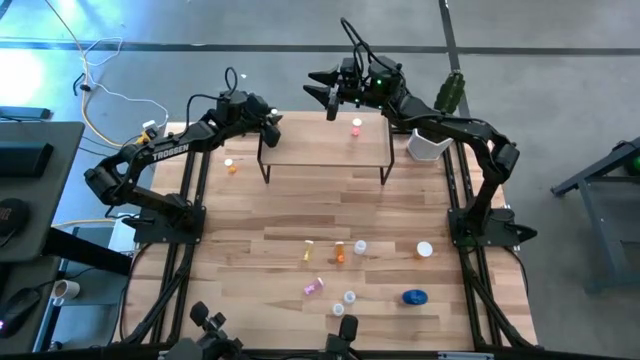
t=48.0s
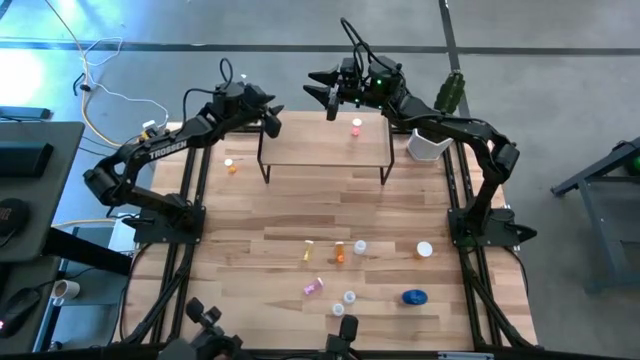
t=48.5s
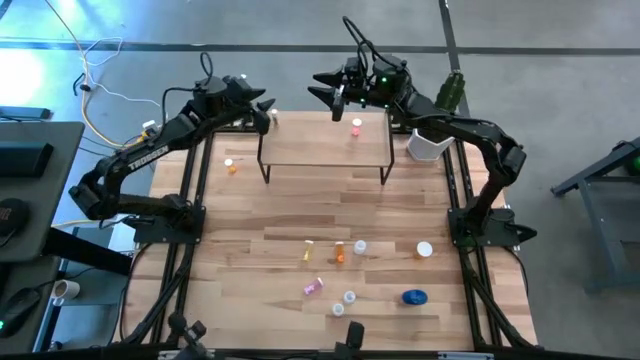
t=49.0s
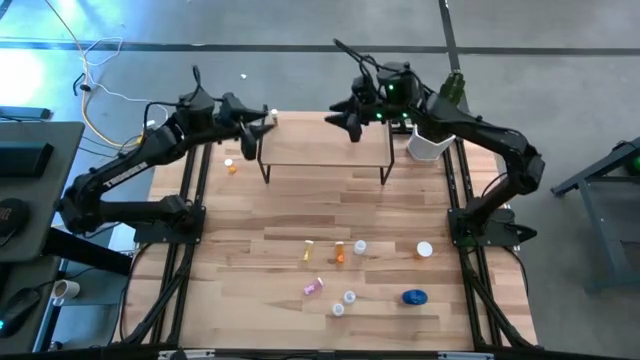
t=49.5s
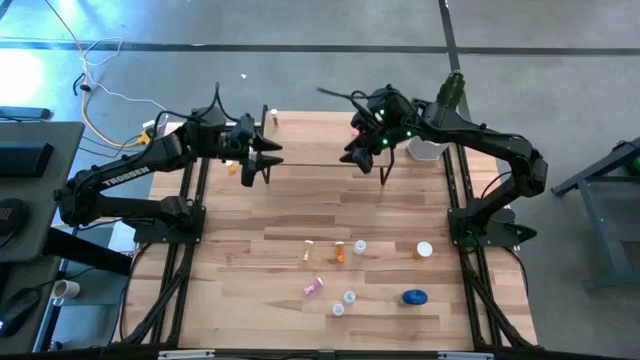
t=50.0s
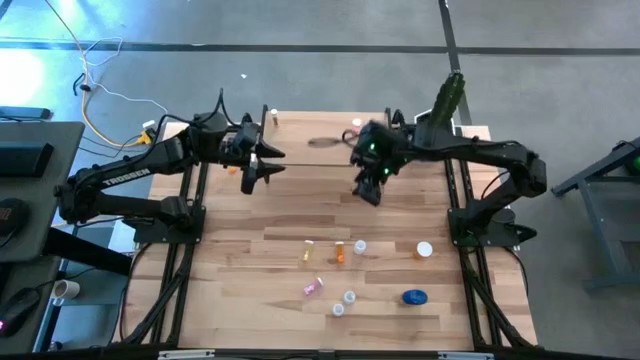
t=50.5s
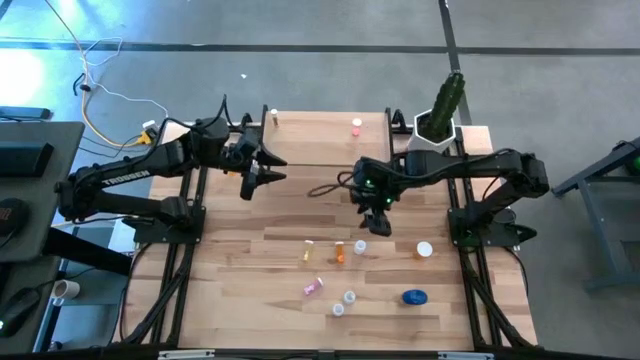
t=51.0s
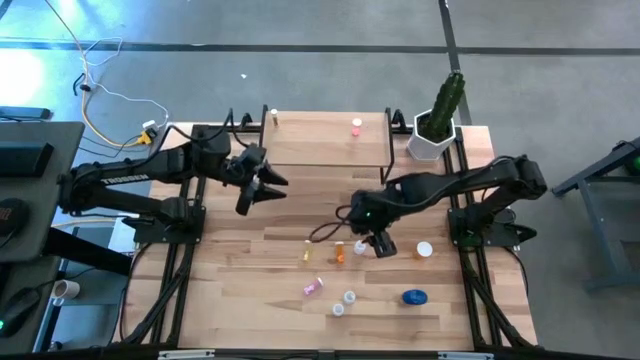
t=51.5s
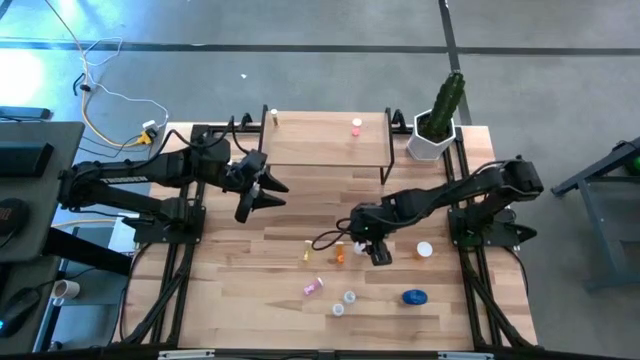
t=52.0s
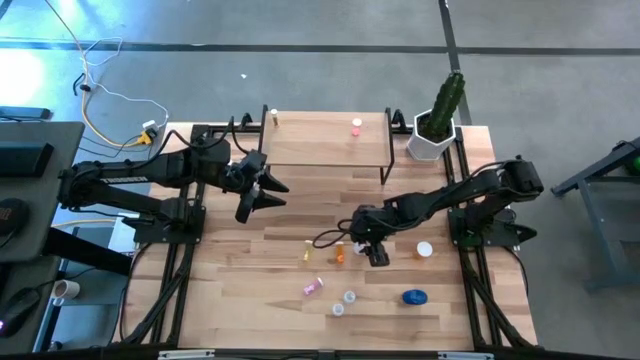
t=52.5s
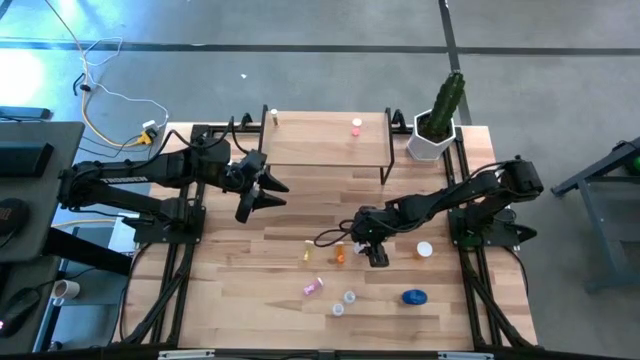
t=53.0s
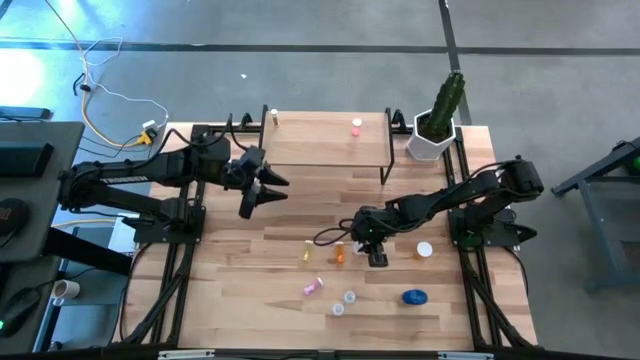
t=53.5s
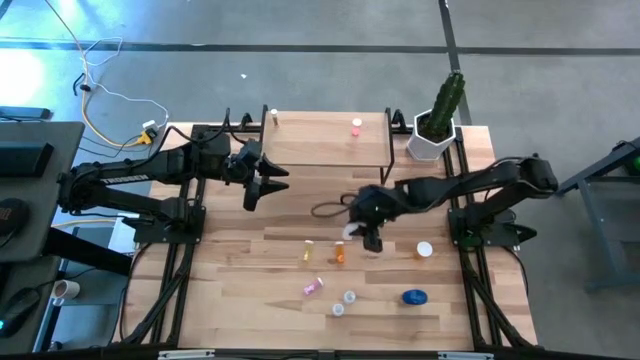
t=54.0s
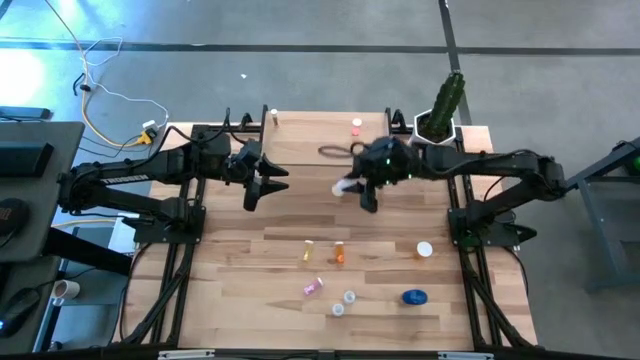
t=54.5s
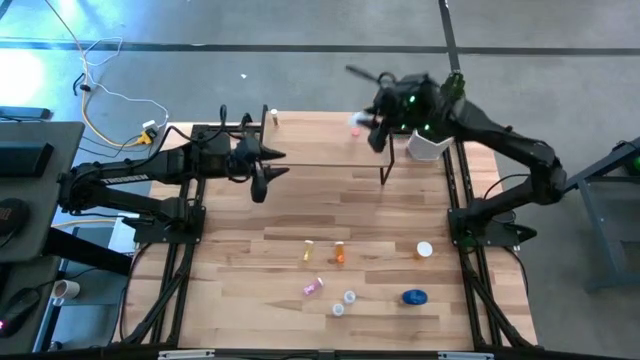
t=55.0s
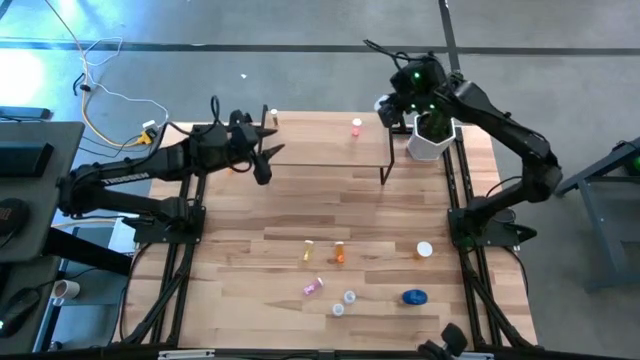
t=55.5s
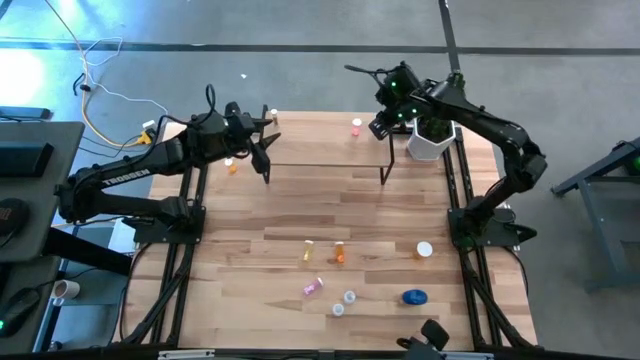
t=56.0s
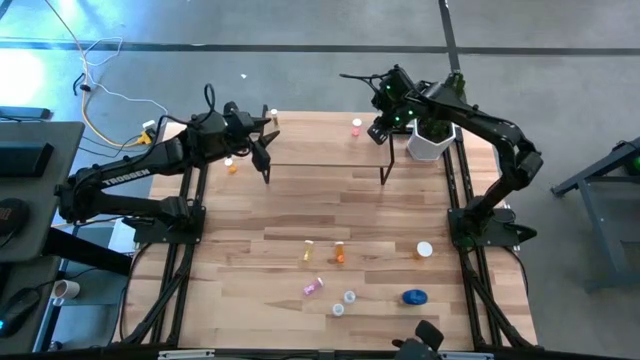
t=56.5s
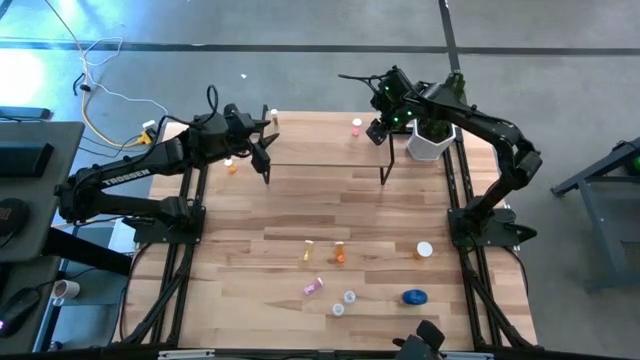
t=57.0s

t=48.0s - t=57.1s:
Task: Pick and place medicine bottles onto shelf by color
Put the top white medicine bottle on the shelf

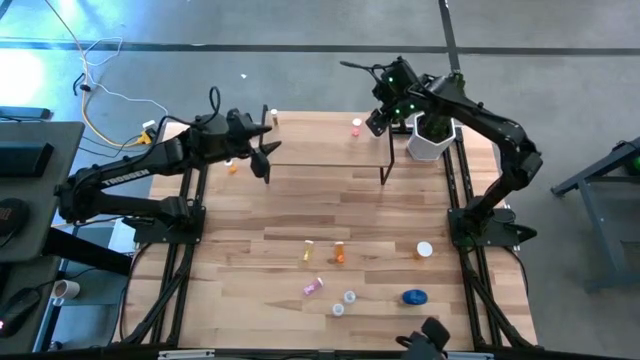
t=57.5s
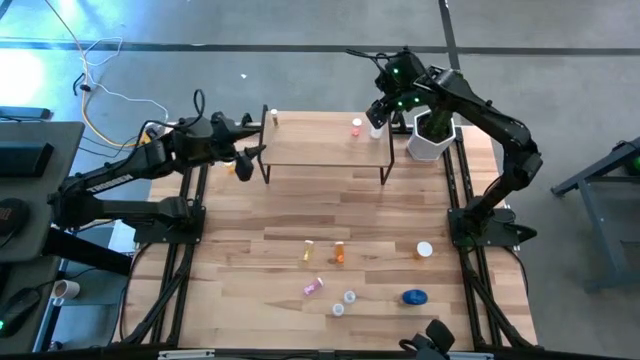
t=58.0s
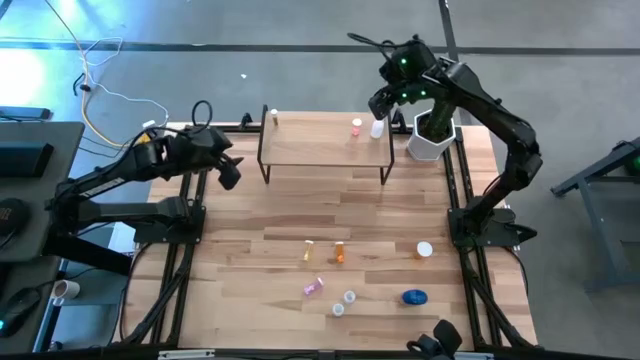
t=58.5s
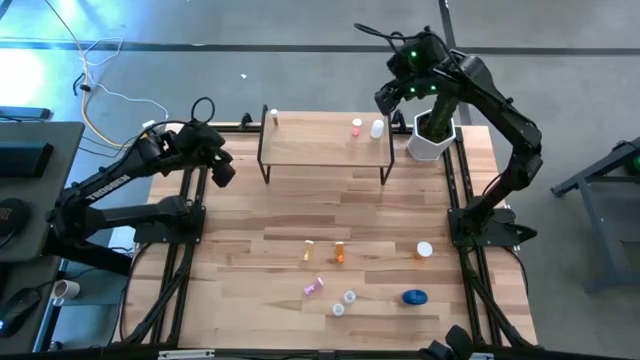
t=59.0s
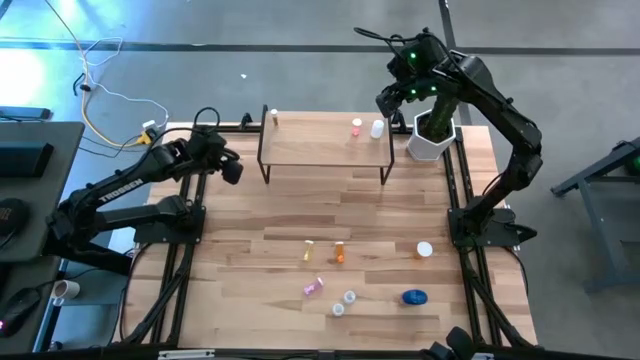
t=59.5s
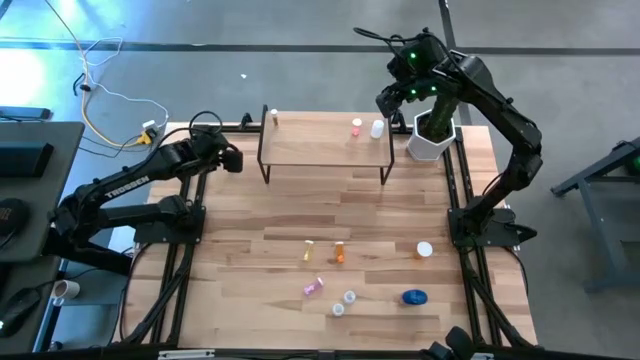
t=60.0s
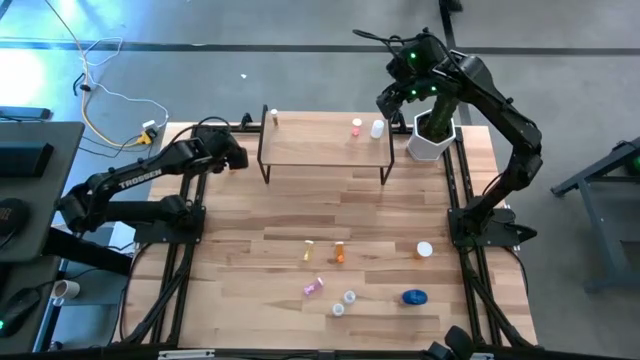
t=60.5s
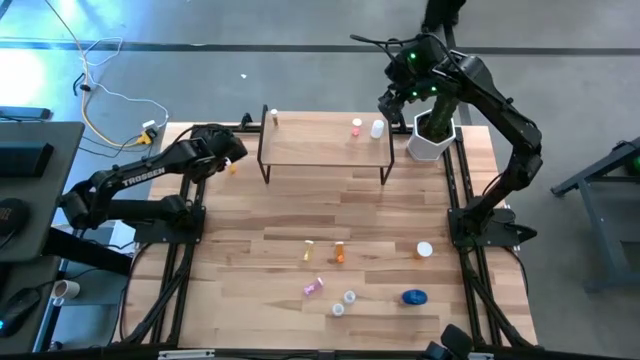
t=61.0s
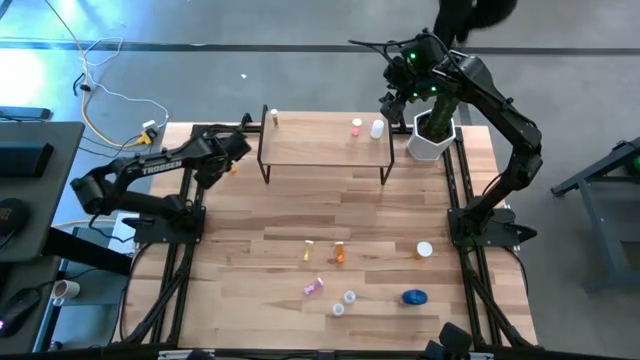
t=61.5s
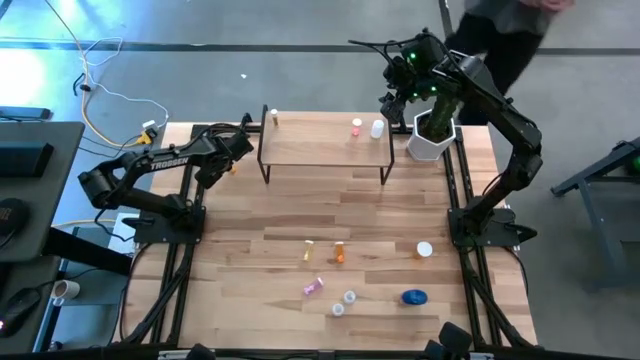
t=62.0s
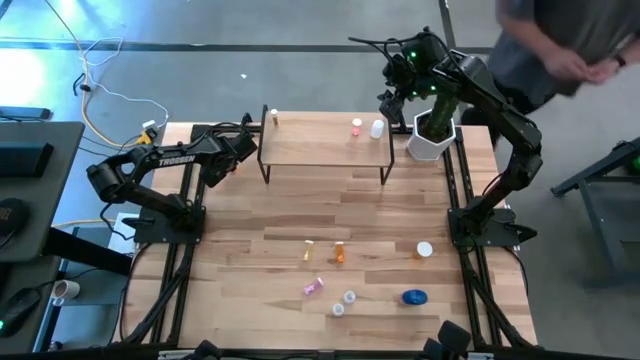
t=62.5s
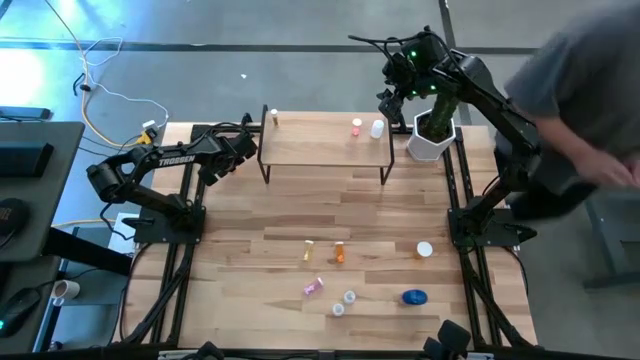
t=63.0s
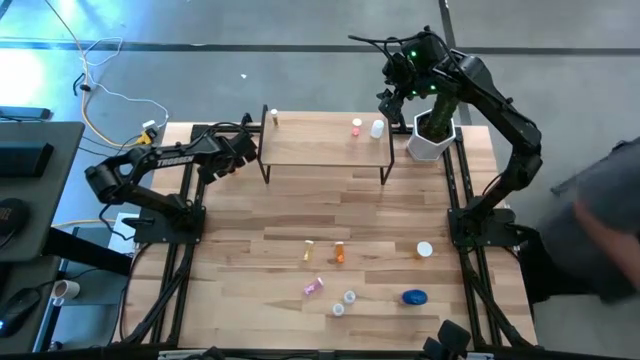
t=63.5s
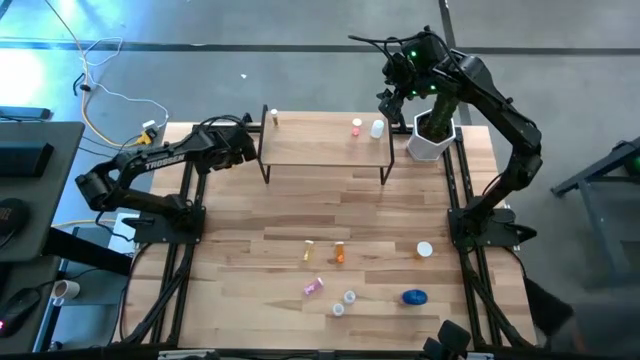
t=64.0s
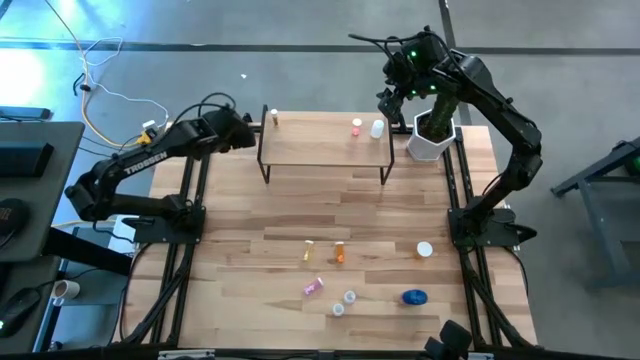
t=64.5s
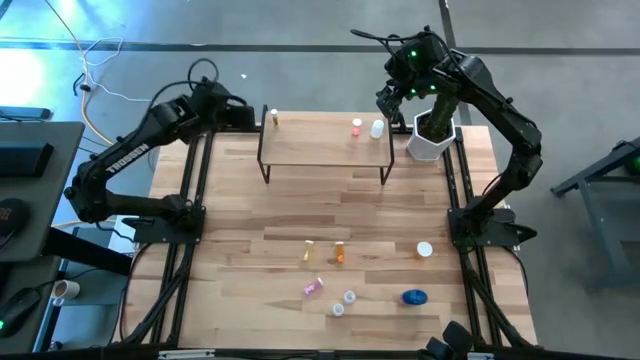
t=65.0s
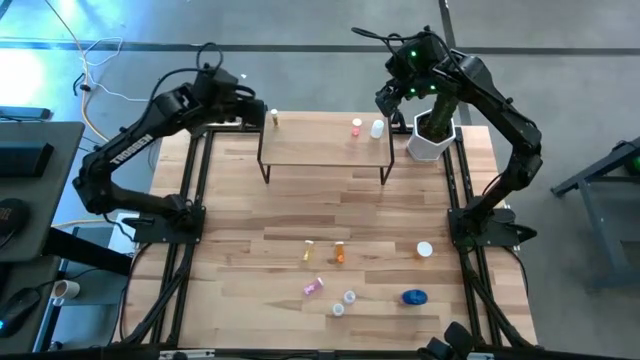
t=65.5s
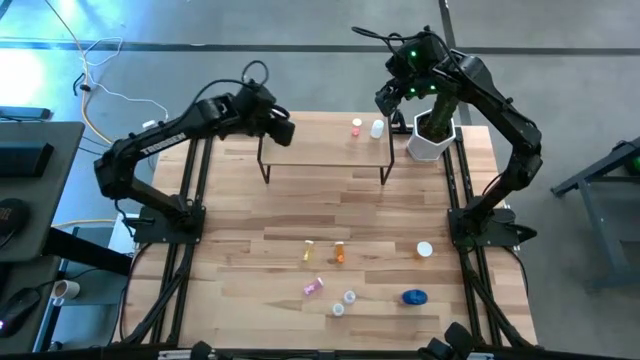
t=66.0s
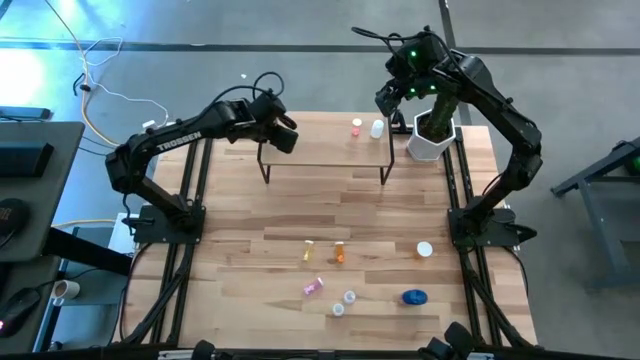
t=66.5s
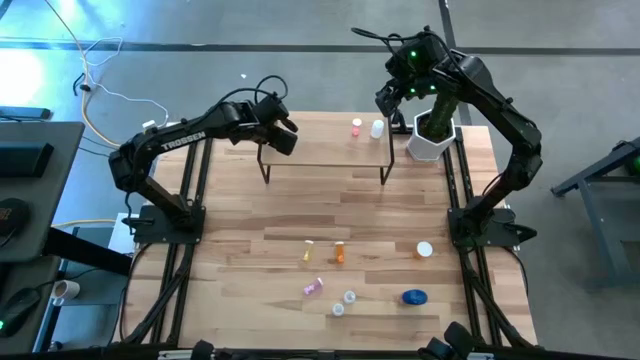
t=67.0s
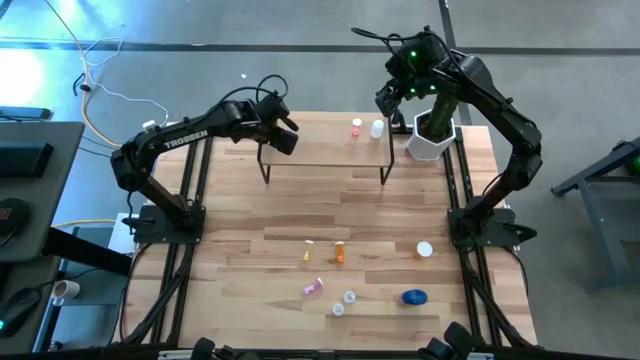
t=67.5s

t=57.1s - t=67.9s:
Put the top orange pill bottle on the shelf
